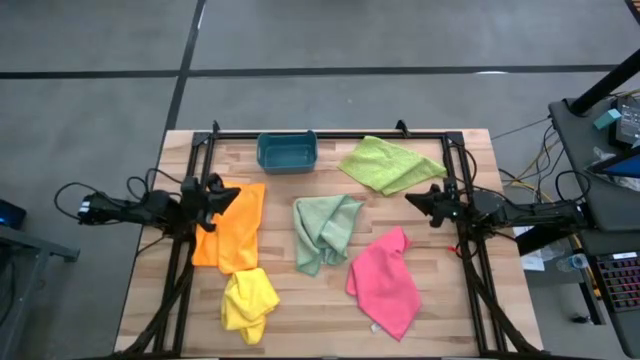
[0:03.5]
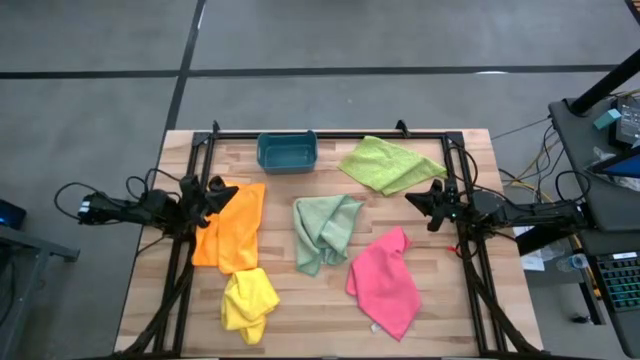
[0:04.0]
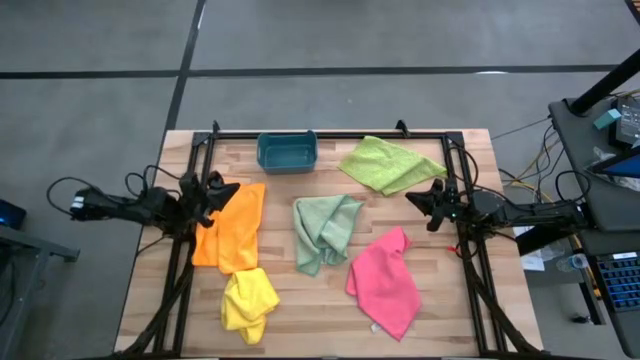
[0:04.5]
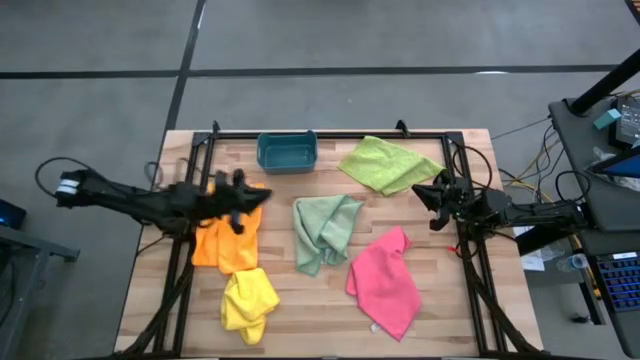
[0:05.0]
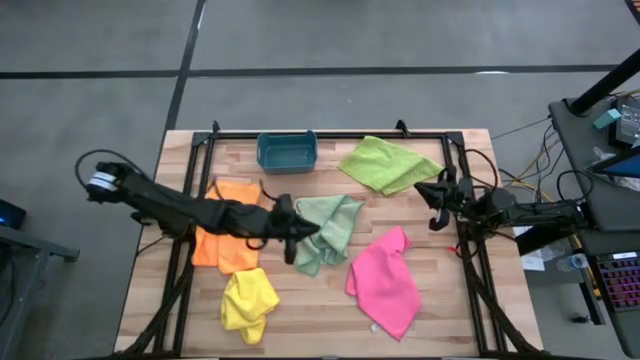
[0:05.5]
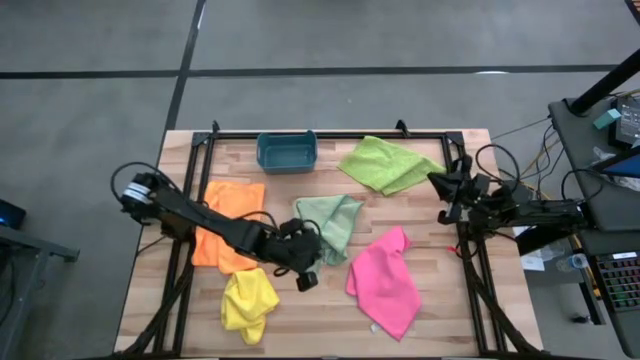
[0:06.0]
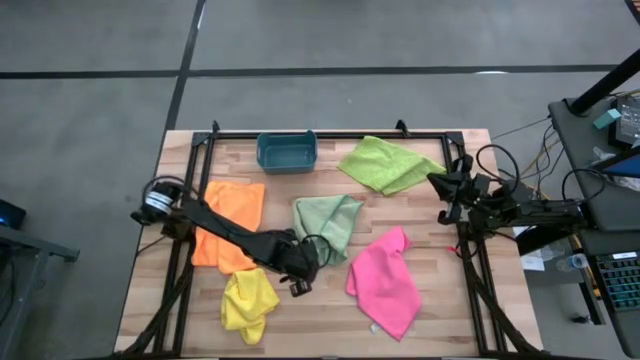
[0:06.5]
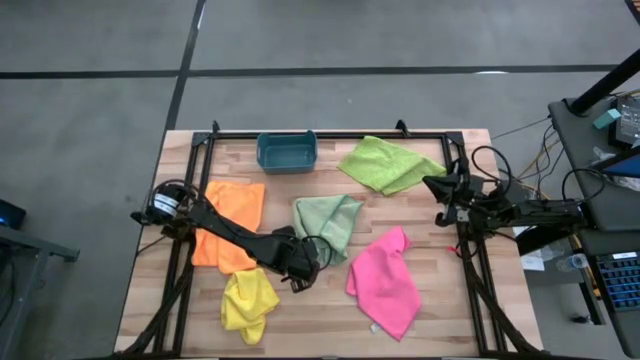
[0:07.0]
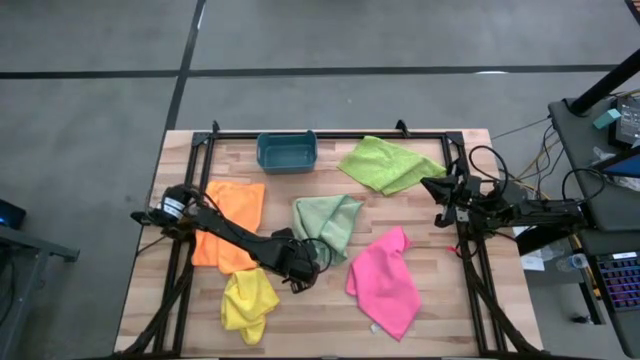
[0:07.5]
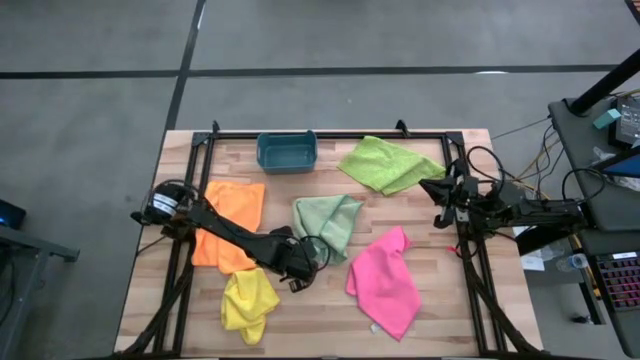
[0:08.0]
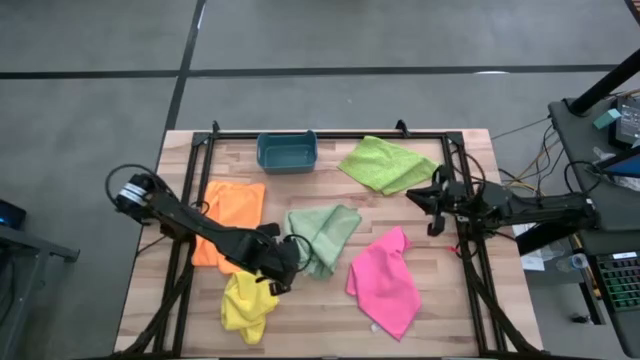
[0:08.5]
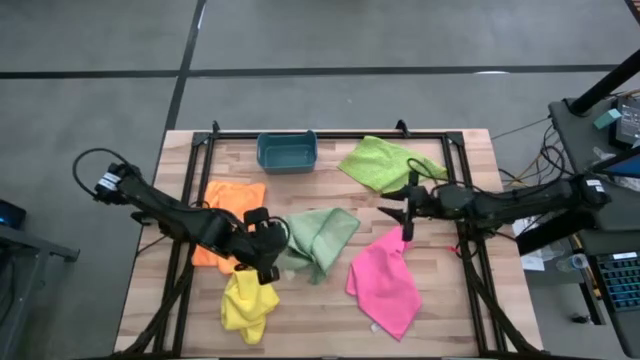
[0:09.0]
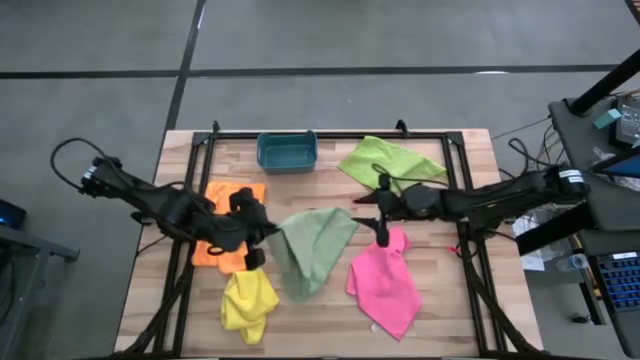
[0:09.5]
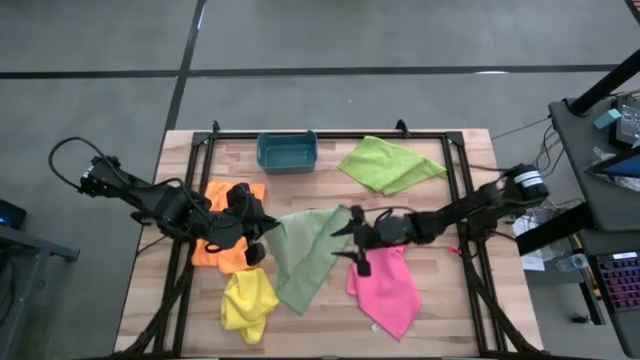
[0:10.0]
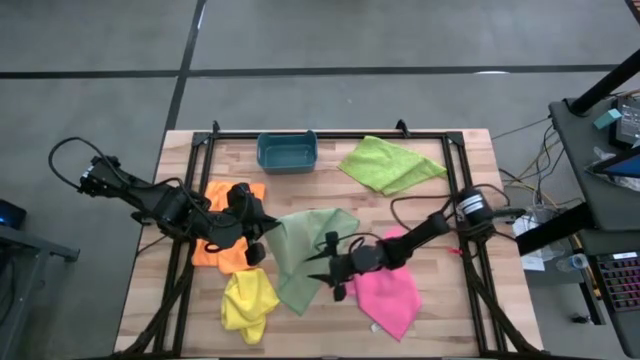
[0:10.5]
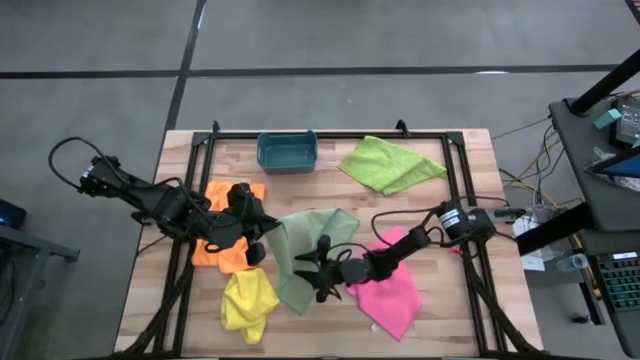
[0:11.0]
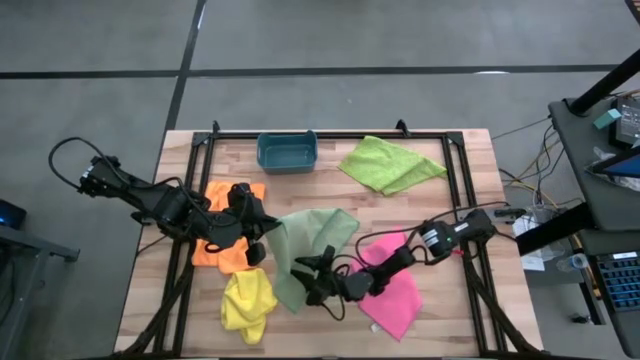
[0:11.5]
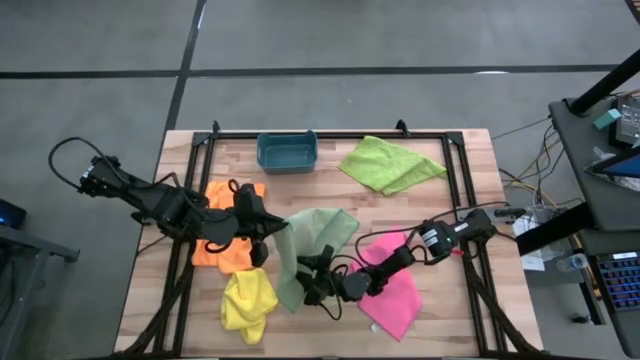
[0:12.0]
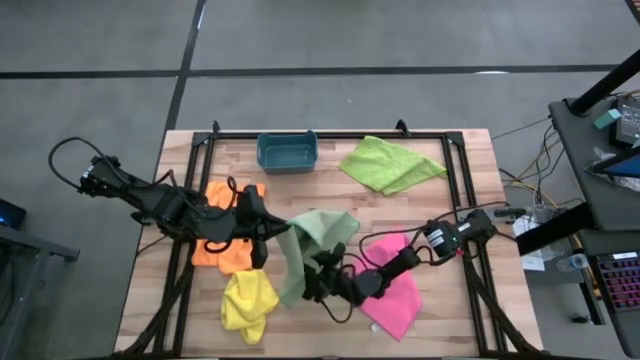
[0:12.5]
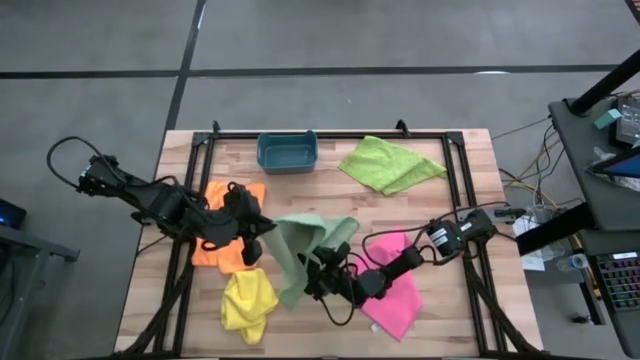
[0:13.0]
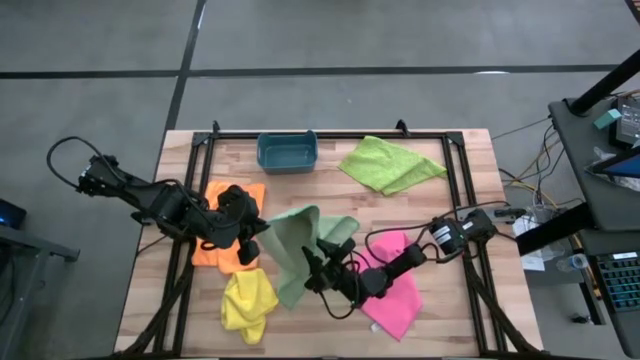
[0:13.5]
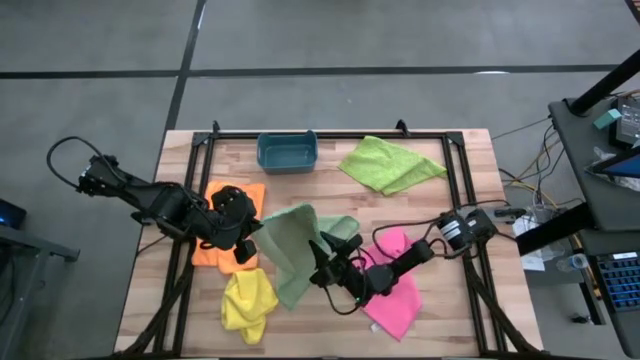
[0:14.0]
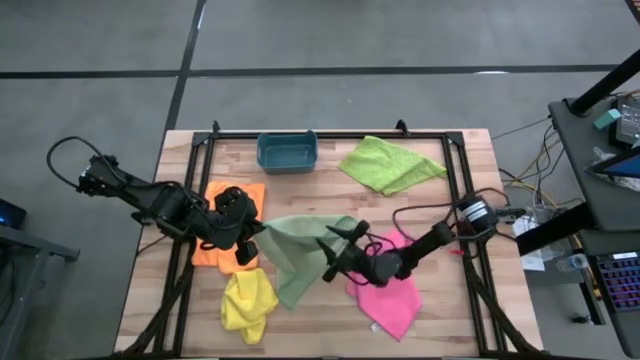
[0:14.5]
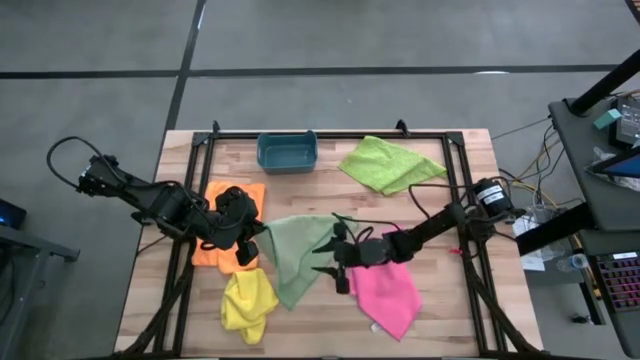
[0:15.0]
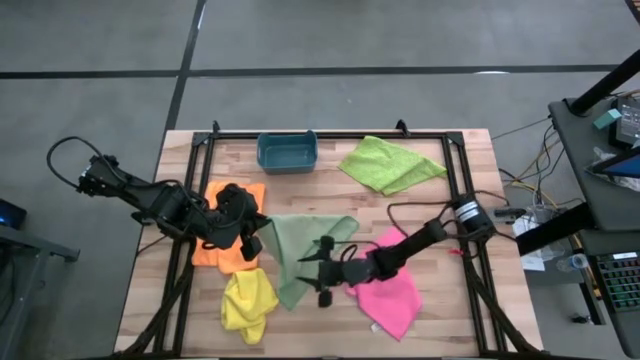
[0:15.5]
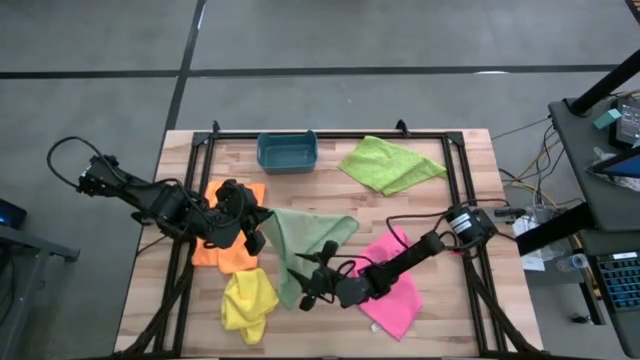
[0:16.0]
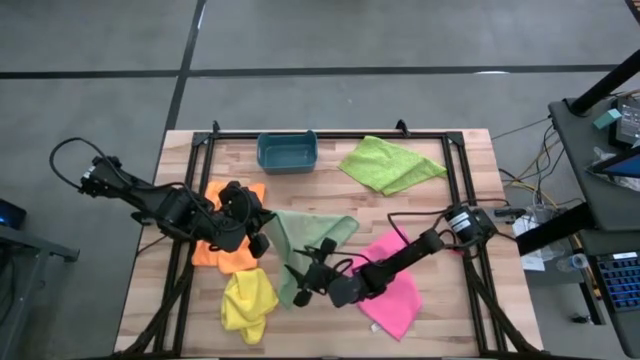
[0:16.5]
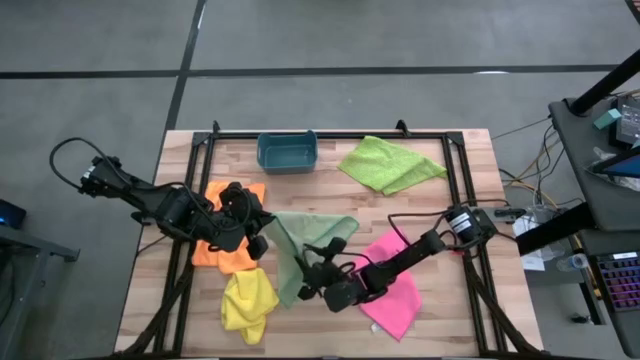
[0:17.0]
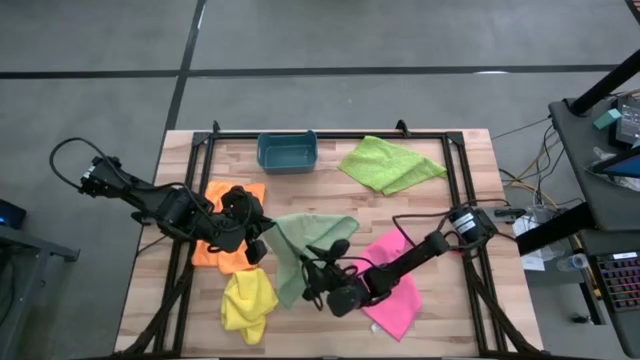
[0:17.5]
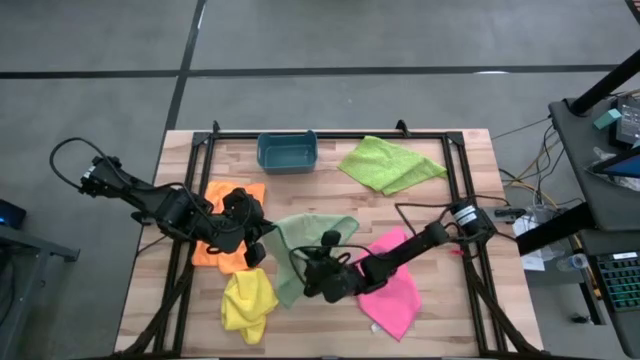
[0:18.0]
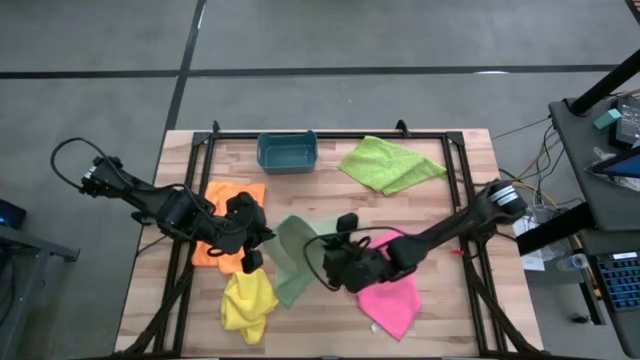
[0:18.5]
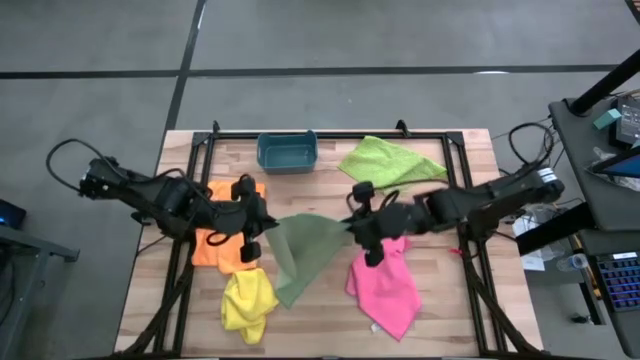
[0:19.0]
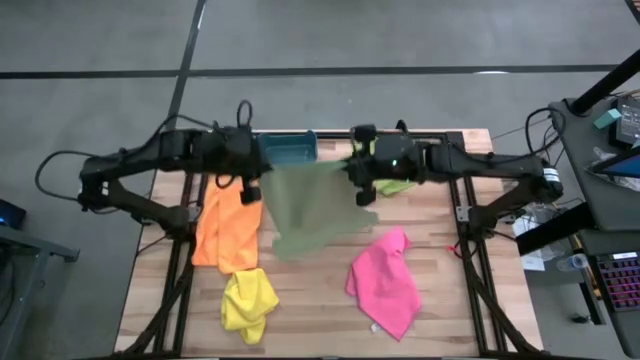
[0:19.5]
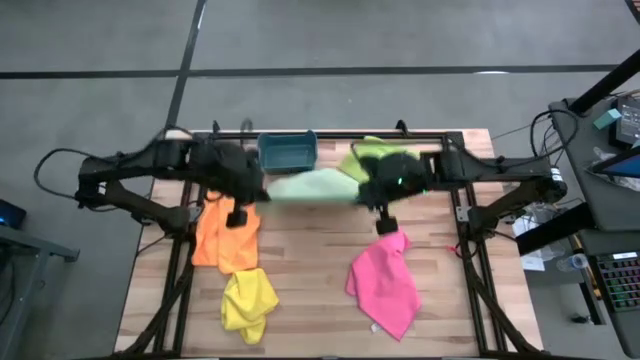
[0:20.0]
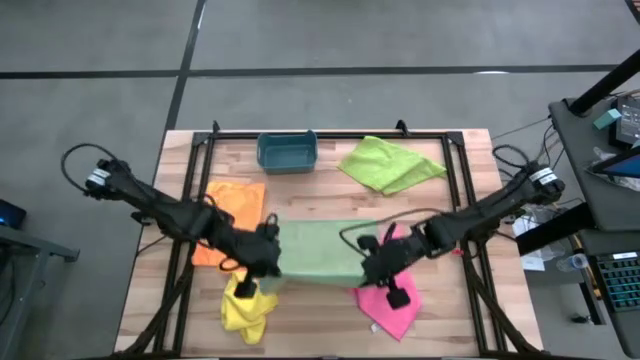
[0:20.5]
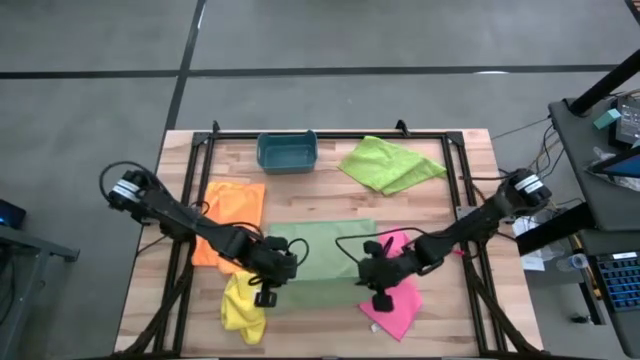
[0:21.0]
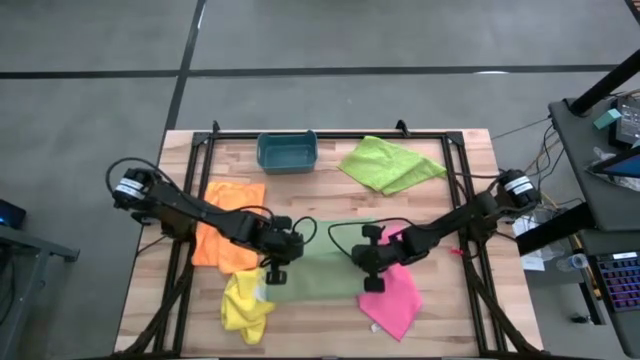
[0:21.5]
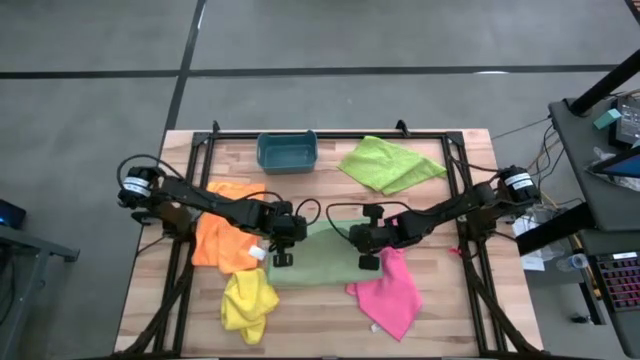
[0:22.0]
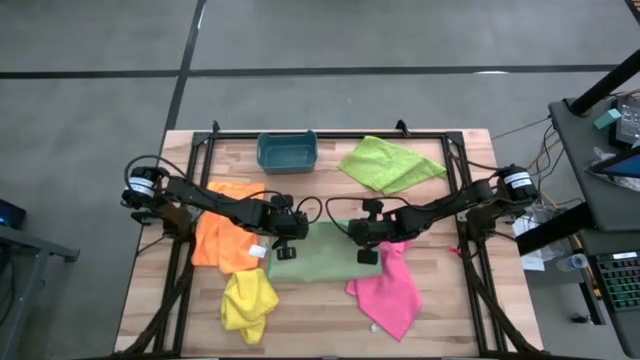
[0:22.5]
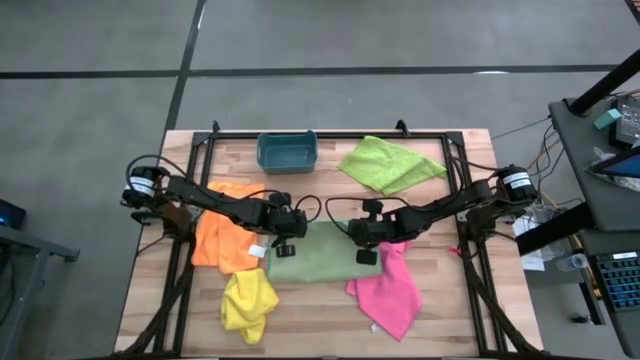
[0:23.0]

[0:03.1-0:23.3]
Task: Fold microfiber towels
Fold the blue towel
